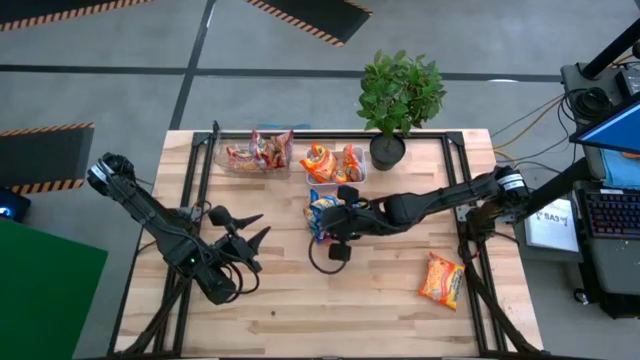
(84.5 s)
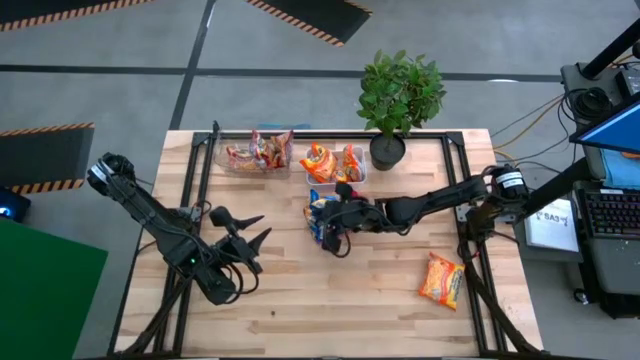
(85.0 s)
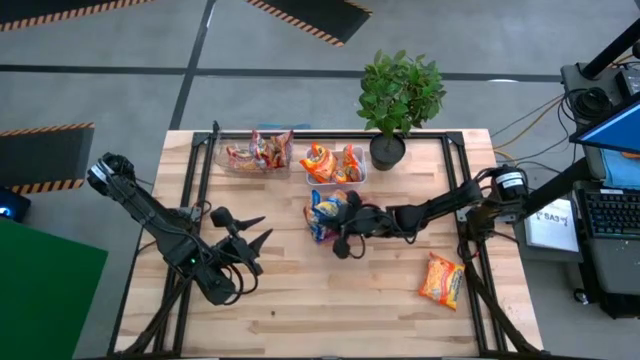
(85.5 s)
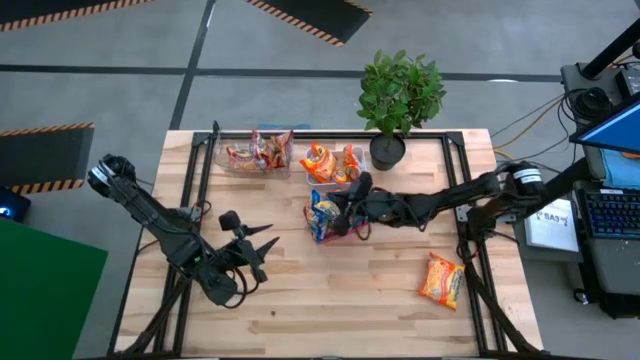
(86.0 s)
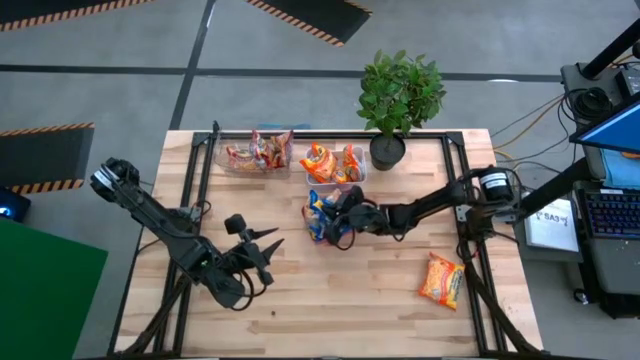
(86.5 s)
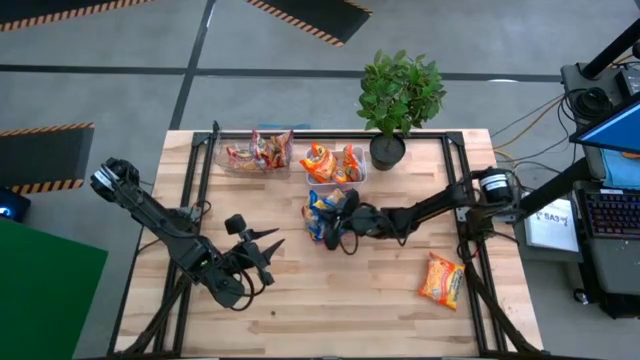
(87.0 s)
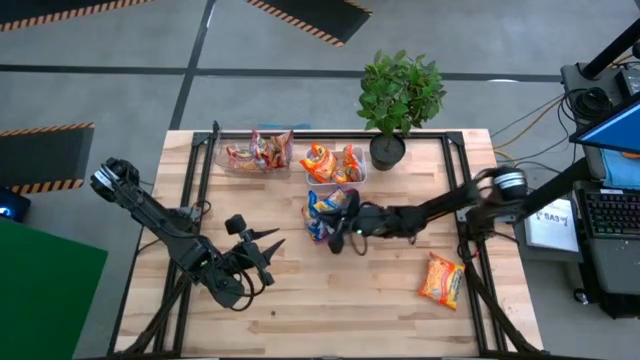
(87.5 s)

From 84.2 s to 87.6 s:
Task: Sort Maruchan noodles
Adjust the blue noodle packs in the red bin

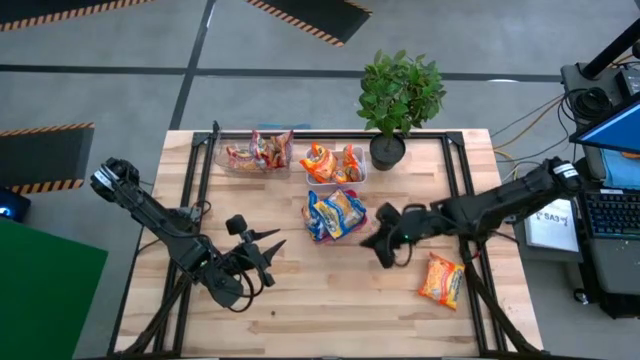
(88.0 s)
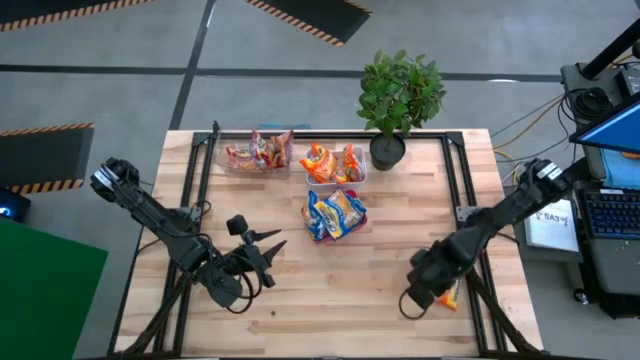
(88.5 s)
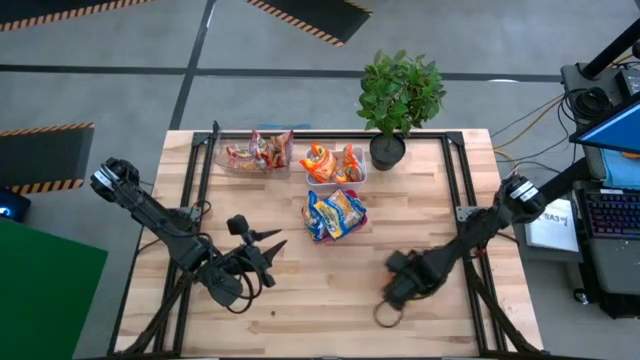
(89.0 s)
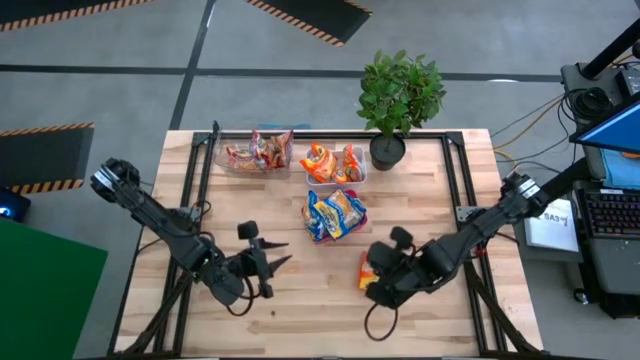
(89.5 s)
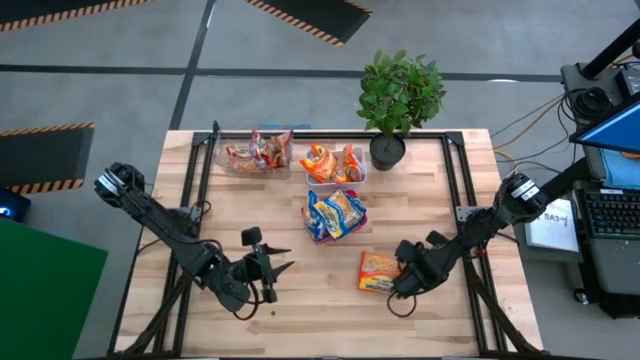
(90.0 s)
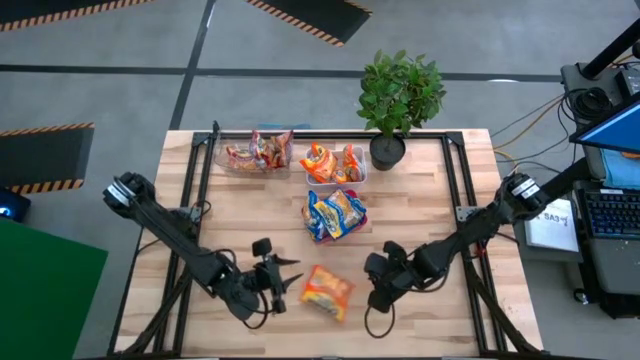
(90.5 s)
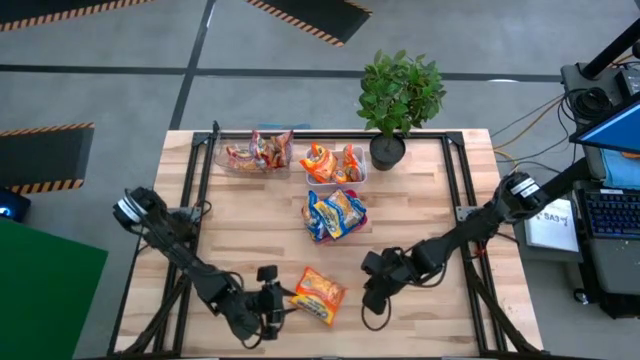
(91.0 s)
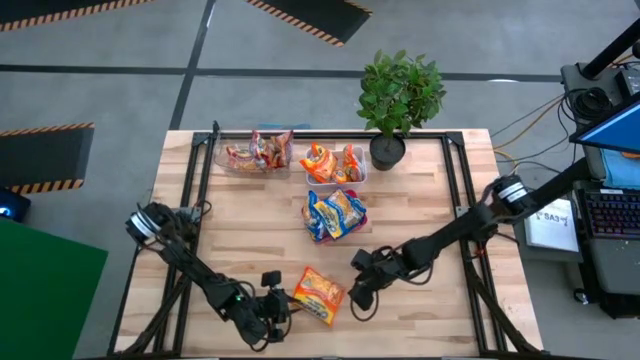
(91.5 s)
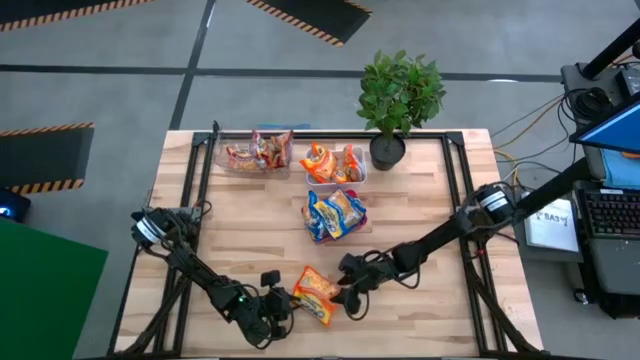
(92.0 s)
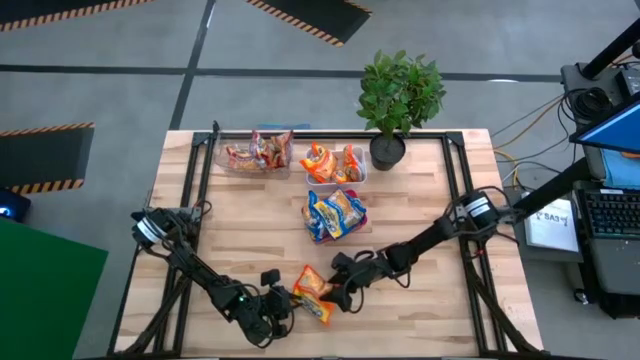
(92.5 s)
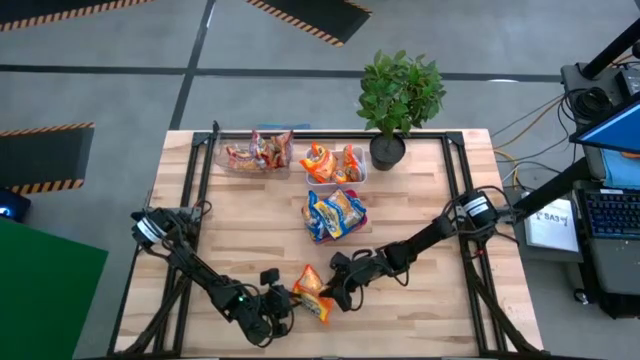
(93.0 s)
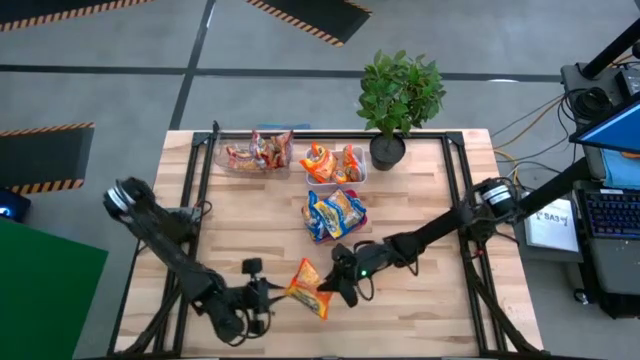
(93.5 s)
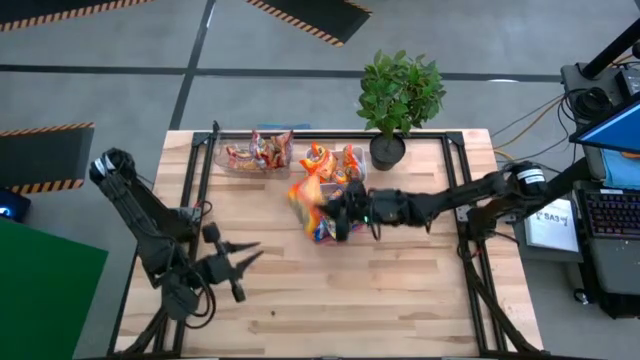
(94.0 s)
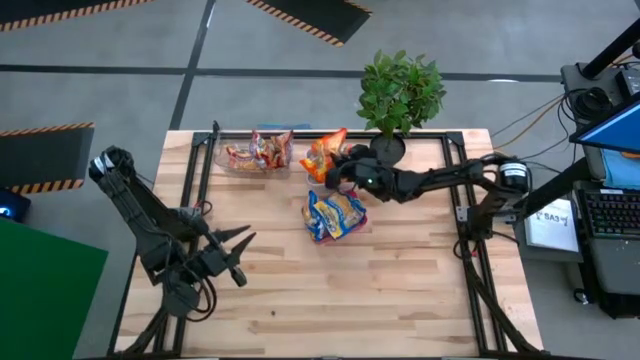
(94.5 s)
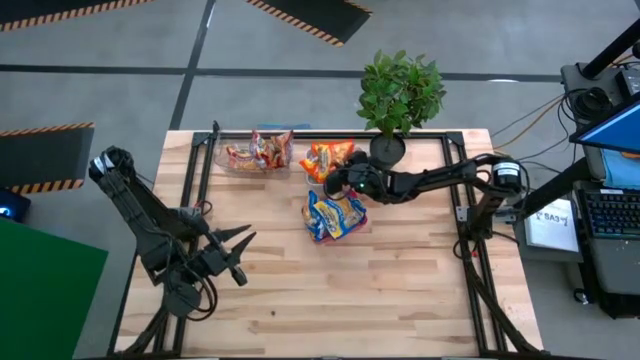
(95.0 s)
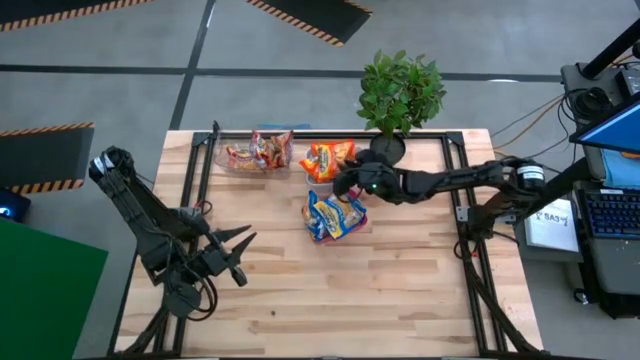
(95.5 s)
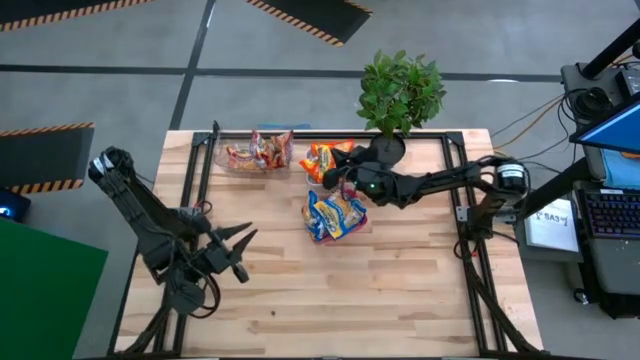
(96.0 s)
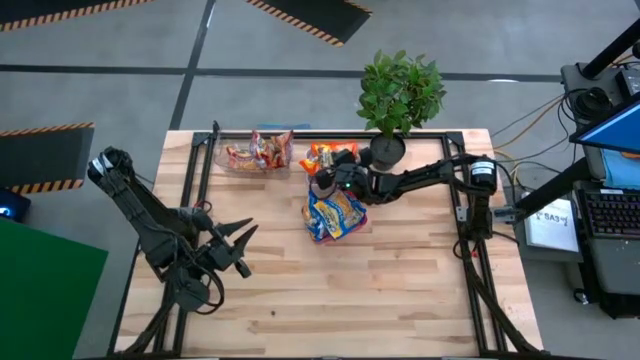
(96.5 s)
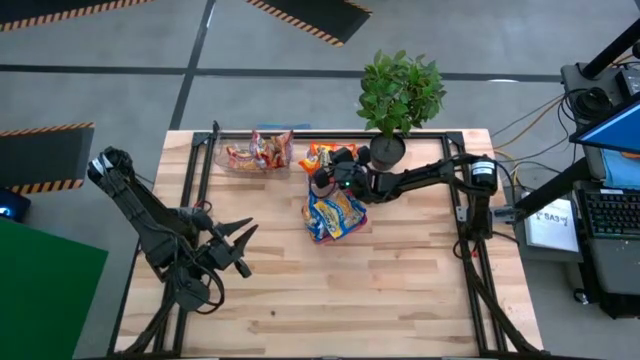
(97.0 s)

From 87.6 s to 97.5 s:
Put the orange noodle pack into the white bin

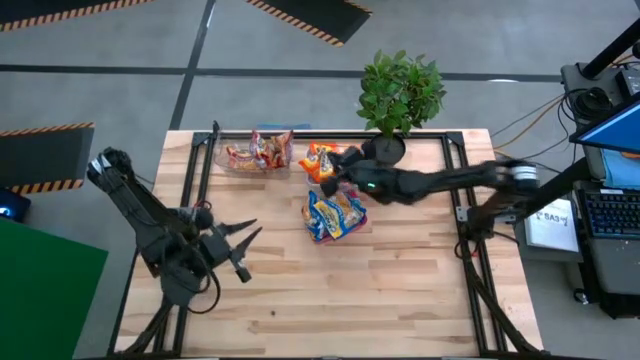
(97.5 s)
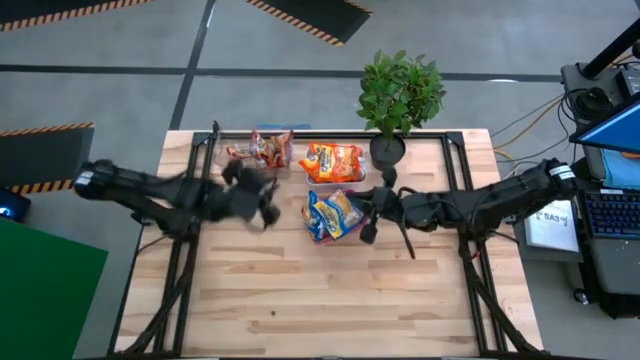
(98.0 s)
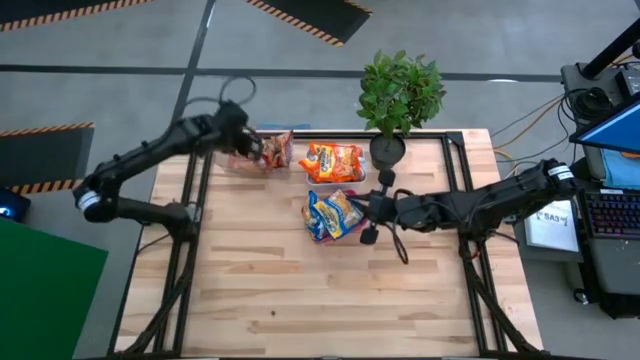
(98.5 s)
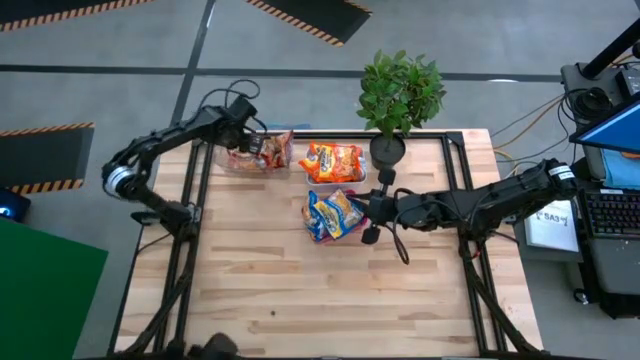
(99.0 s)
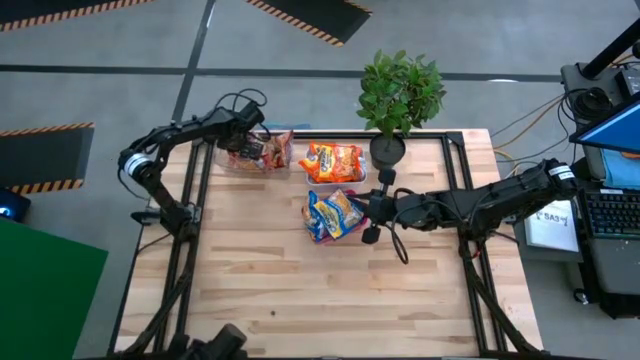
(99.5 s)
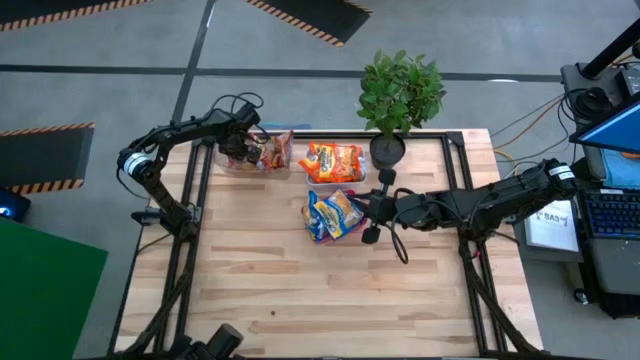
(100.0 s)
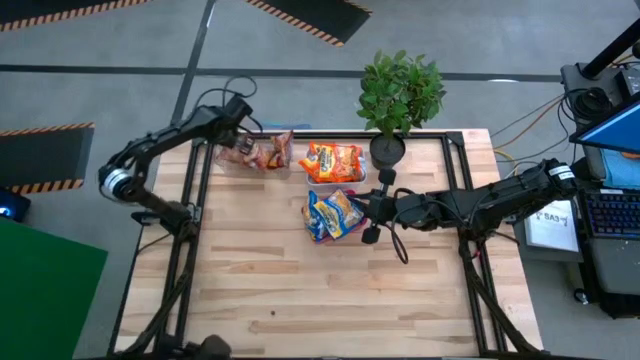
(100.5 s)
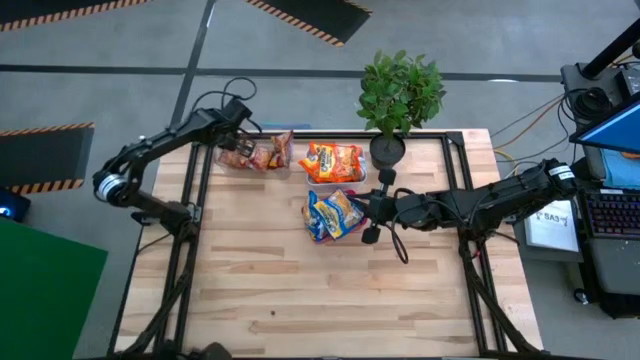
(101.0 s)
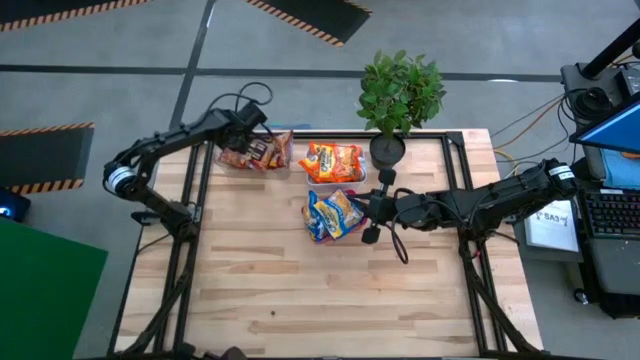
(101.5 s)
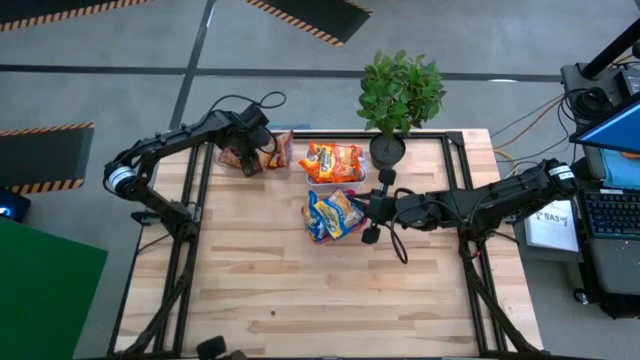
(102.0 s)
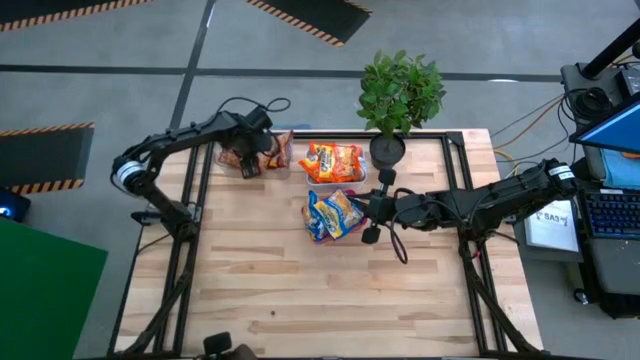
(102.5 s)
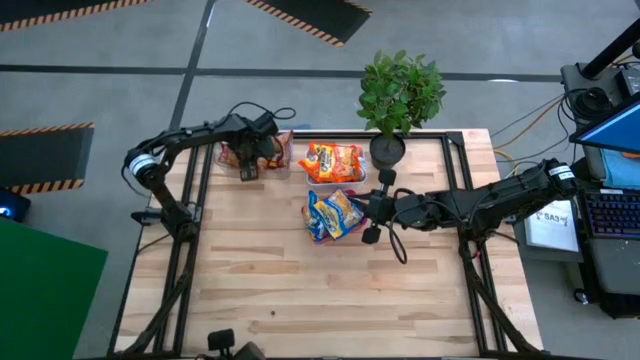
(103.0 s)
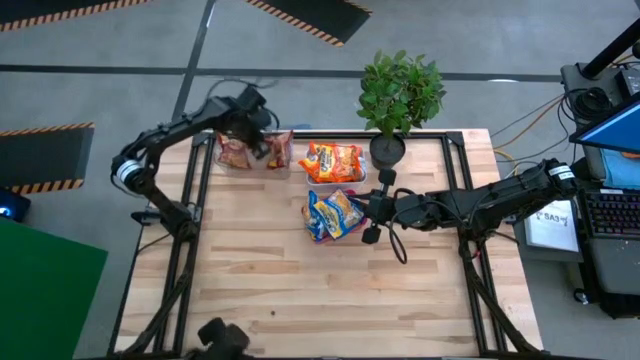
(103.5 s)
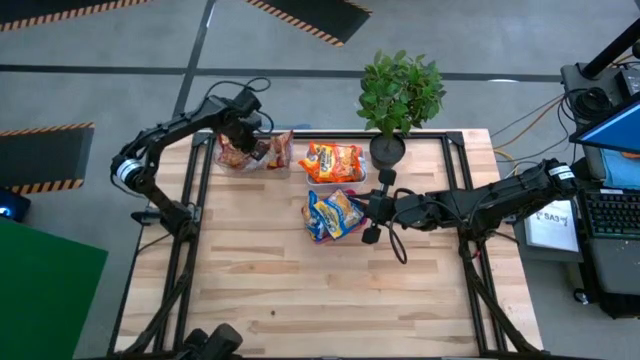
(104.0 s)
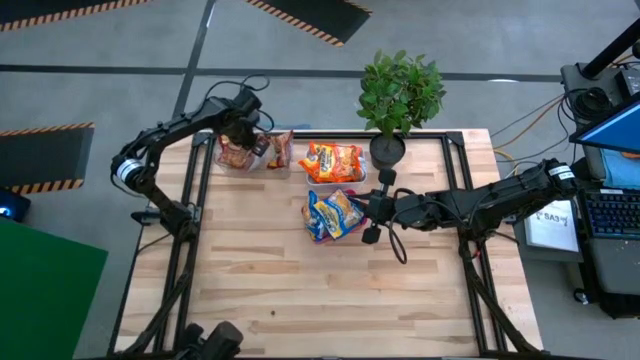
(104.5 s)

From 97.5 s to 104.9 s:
Adjust the red noodle packs in the transparent bin

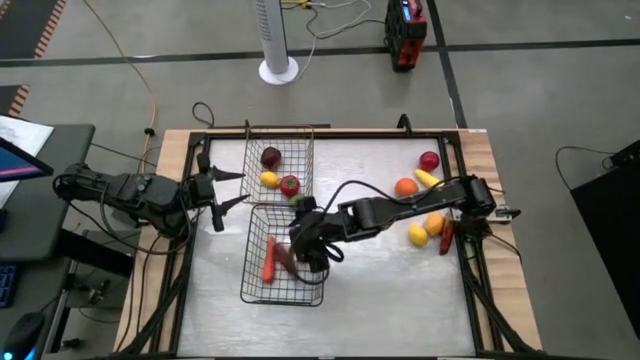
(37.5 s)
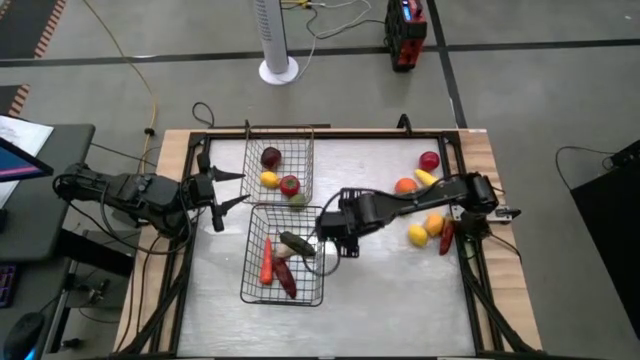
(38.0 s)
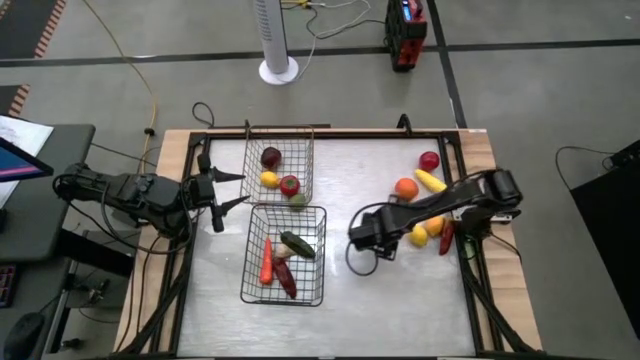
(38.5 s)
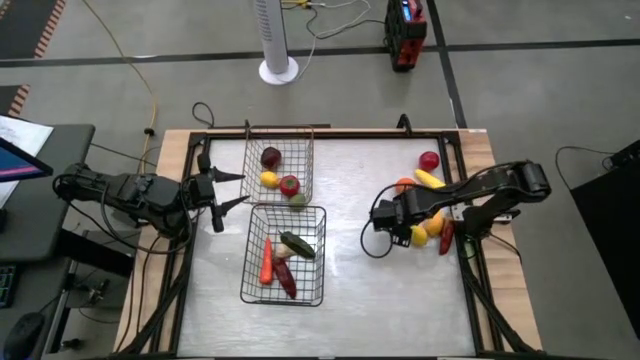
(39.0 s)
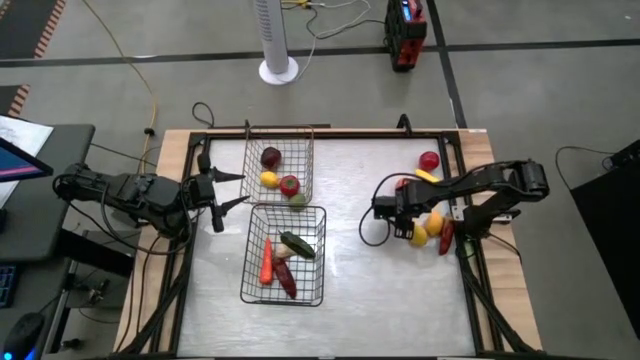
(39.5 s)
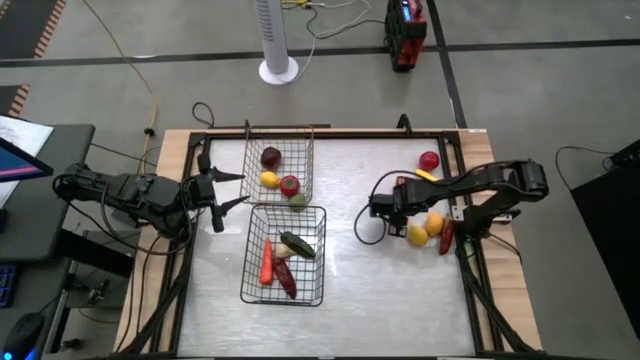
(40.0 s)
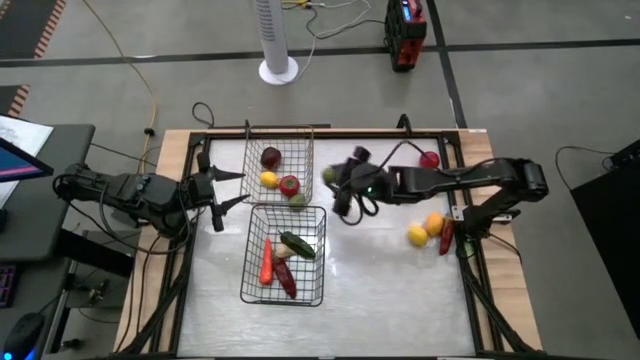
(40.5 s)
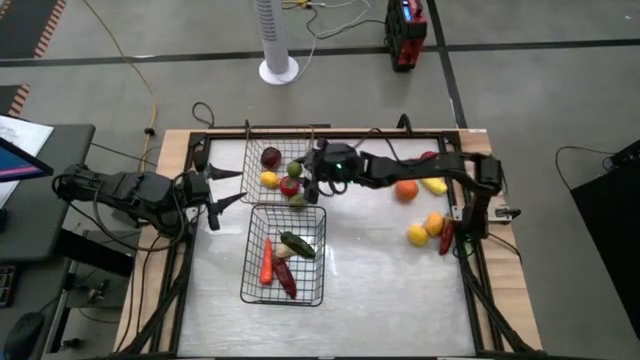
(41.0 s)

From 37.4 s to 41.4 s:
Task: Sort produce into baskets
Put the lime into the gold wire basket
